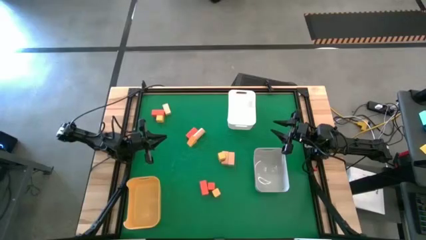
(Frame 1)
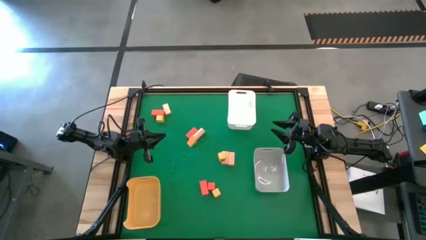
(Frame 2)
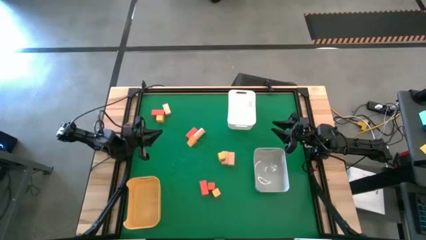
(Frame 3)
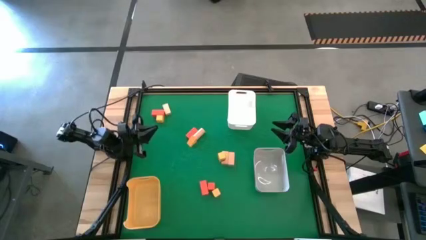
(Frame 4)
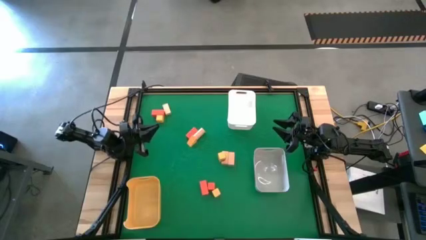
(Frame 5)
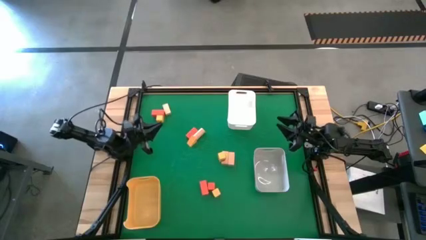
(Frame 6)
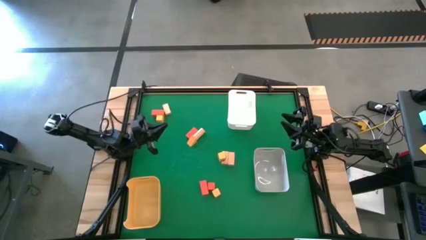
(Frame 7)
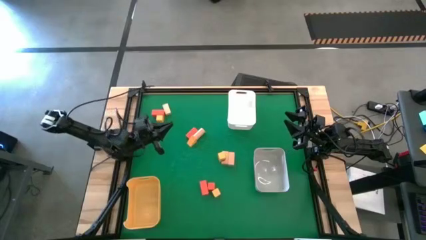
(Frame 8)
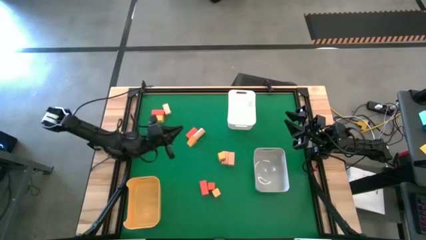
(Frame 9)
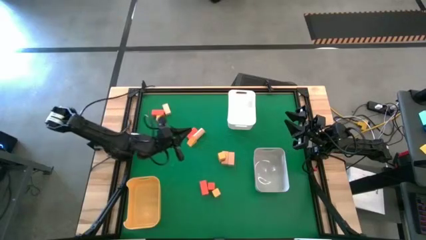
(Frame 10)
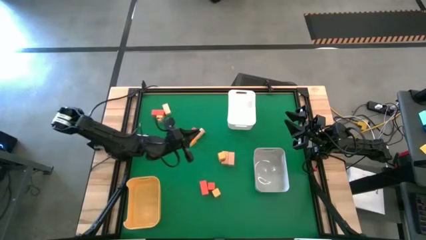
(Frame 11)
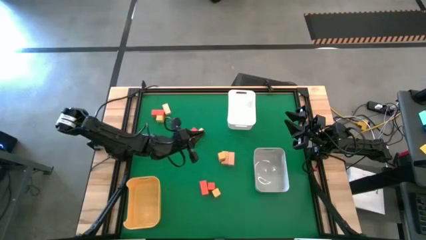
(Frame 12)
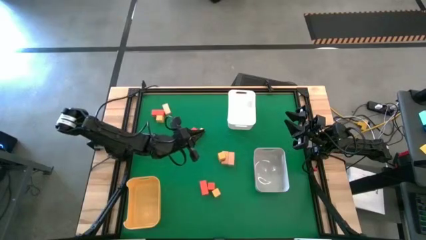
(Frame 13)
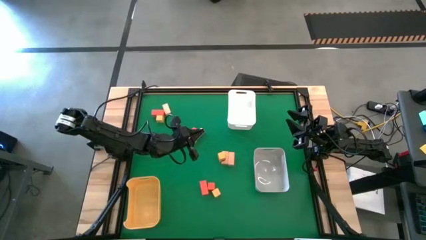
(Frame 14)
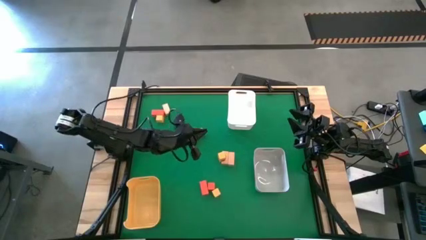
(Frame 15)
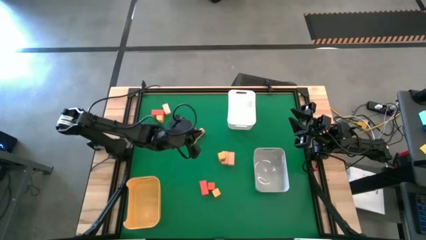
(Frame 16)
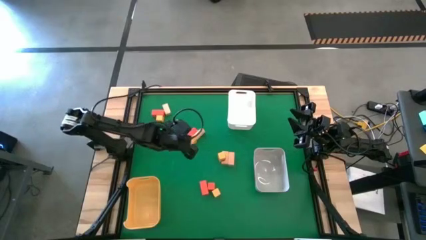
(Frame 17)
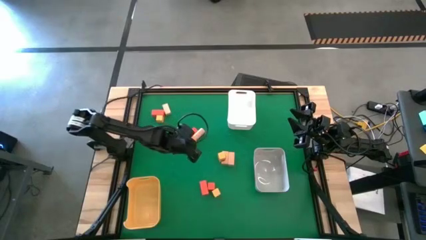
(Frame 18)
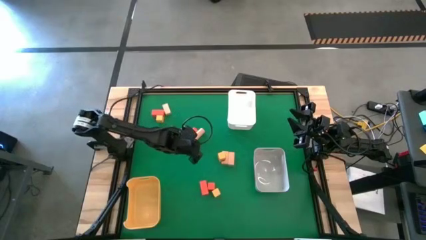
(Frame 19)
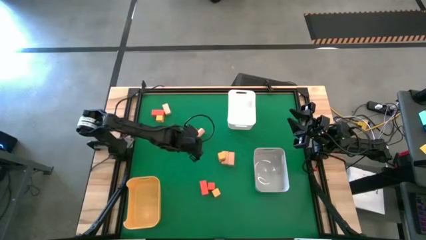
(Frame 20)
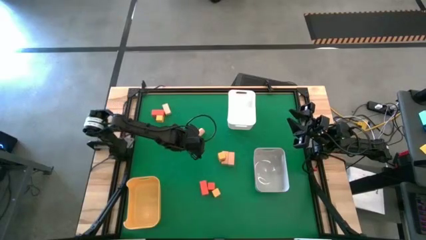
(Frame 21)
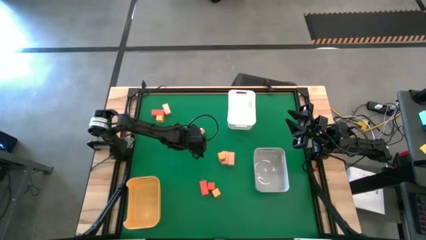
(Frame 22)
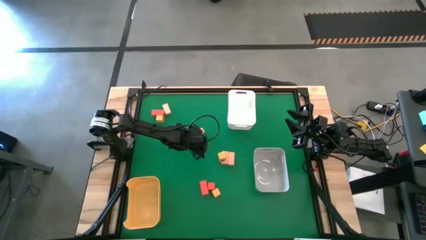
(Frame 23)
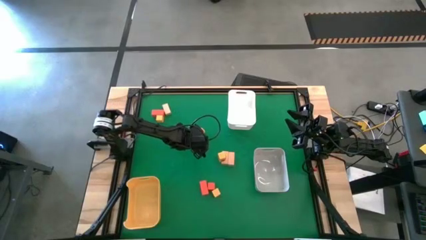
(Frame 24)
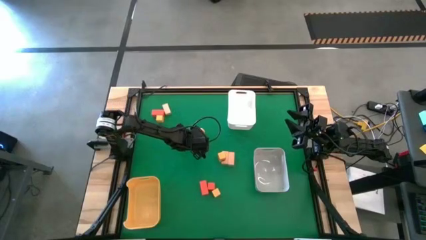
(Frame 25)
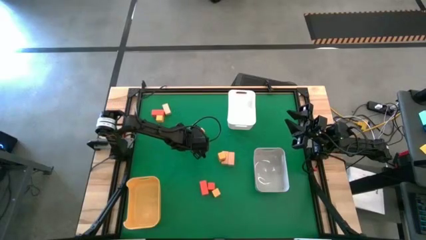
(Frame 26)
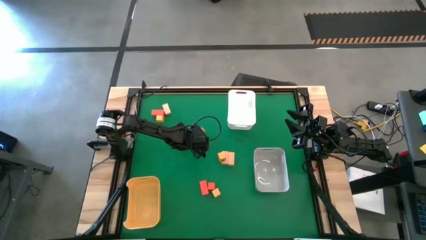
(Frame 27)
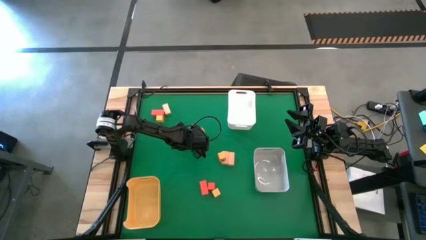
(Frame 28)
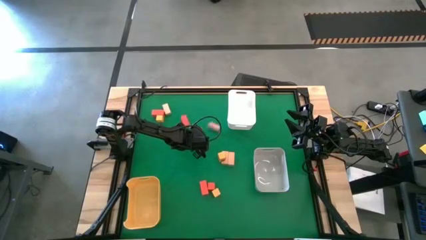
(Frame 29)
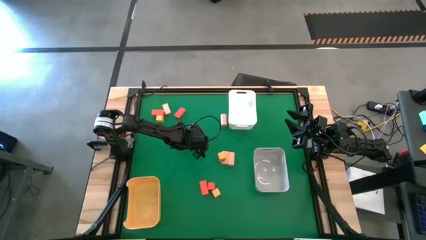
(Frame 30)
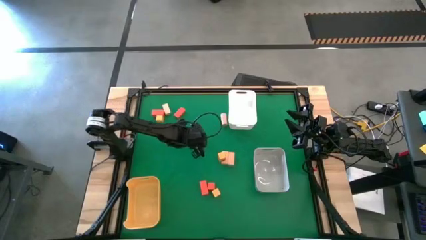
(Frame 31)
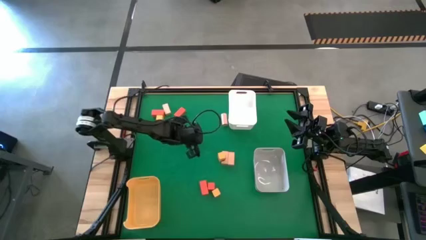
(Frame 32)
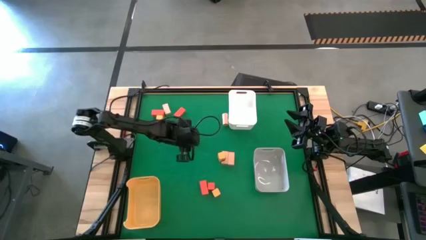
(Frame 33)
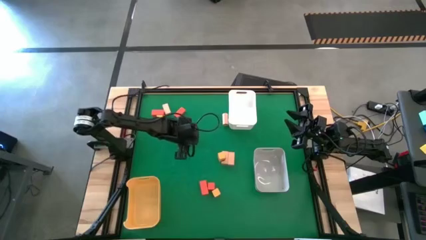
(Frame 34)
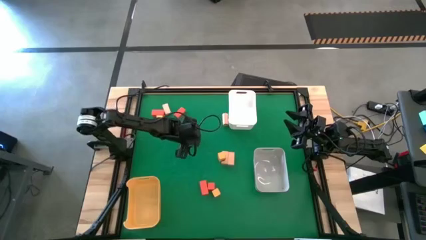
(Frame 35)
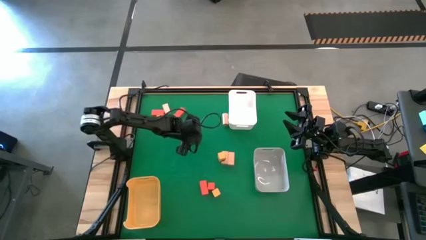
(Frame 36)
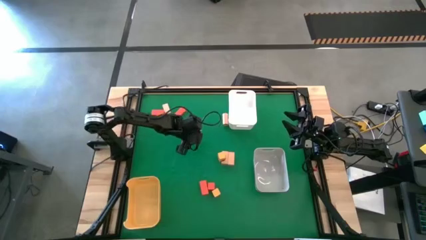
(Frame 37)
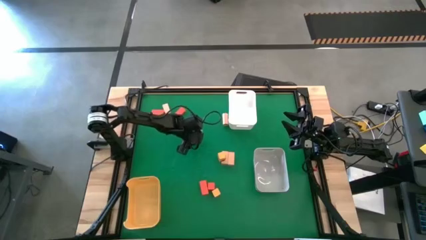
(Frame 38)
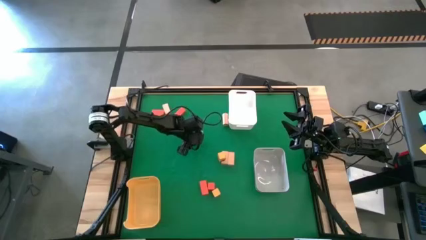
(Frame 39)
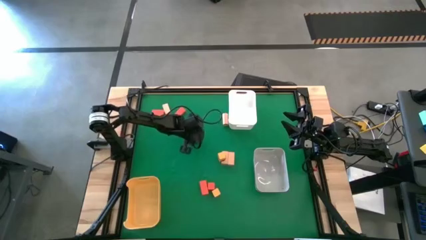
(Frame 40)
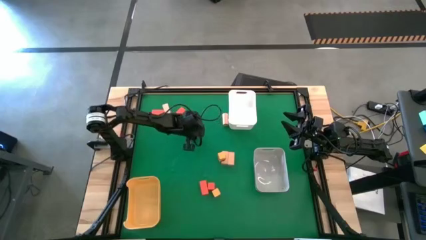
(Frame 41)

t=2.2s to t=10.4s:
Task: Sort & place blocks by color
Put the yellow block into the white bin

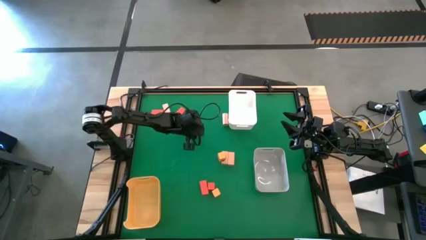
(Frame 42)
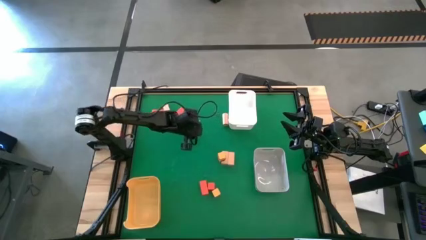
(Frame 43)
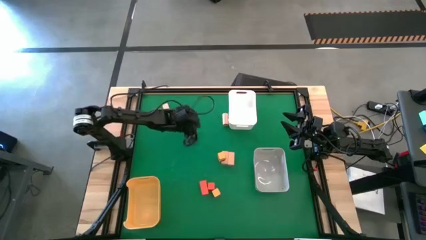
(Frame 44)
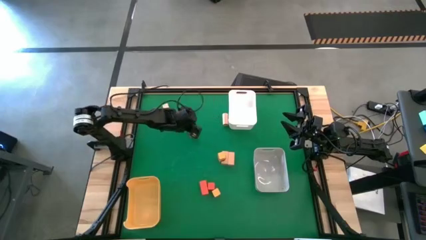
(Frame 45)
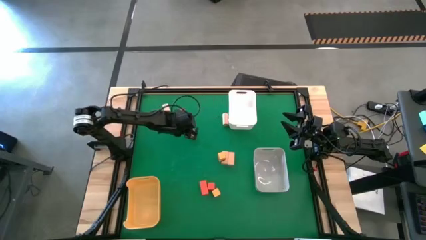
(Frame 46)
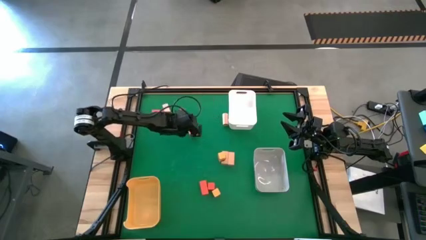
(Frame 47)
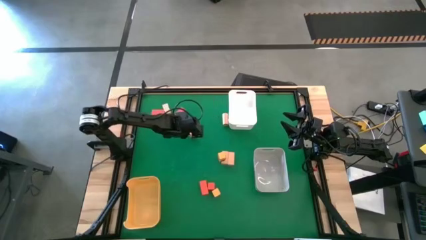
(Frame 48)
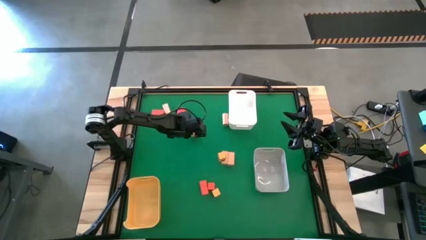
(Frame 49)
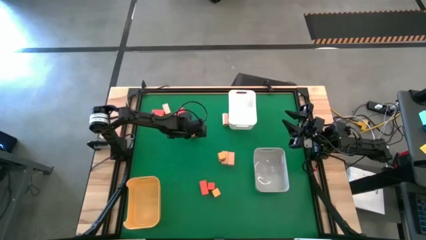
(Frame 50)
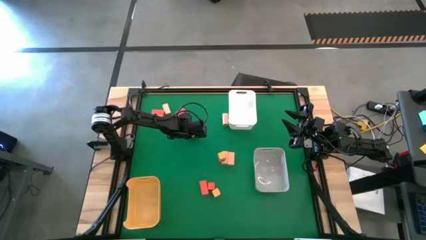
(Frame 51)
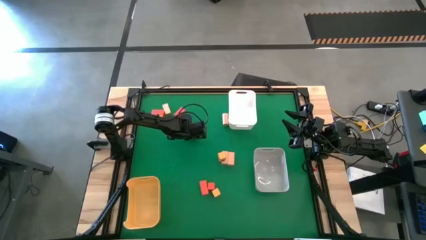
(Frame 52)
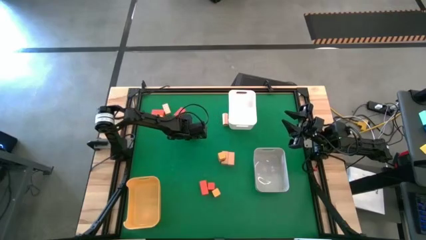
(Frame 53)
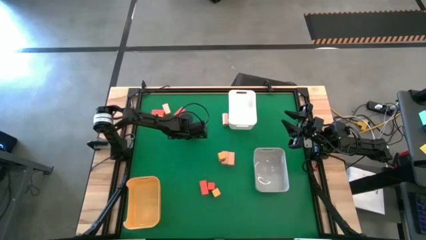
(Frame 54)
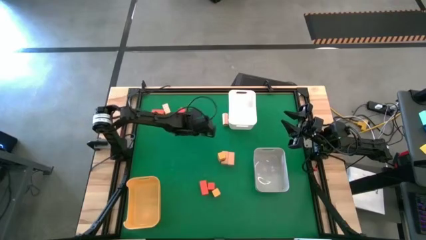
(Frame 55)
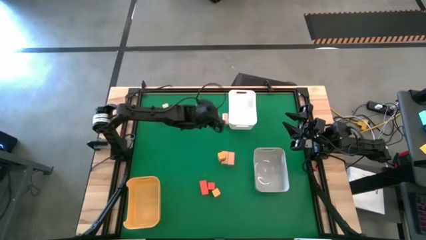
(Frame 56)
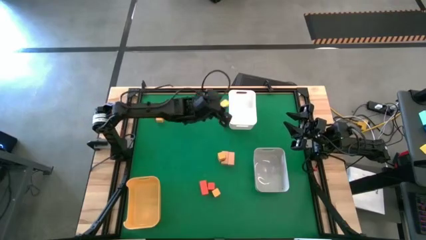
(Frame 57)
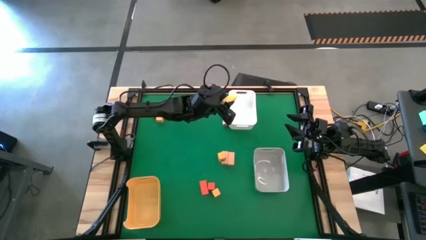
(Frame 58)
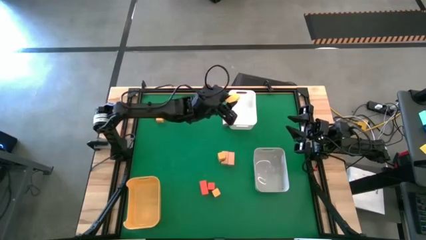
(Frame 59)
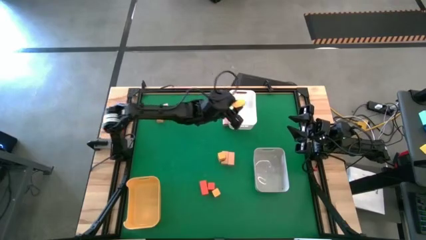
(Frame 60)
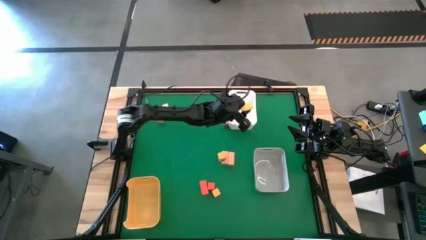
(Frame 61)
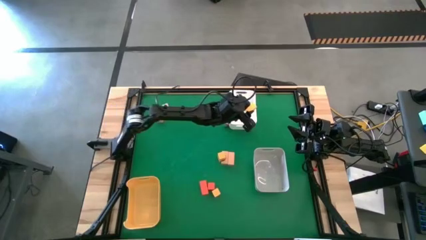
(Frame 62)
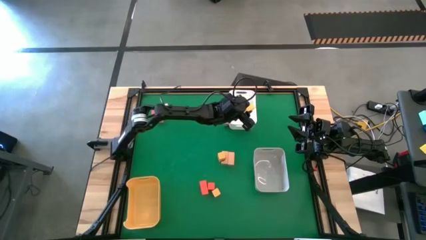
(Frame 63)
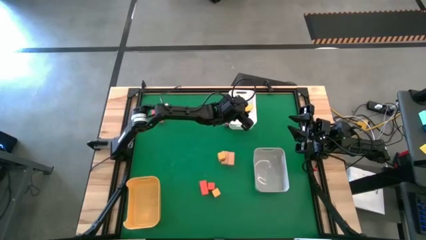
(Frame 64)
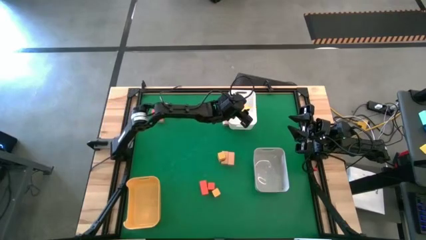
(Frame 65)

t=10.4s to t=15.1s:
Put the yellow block into the white bin

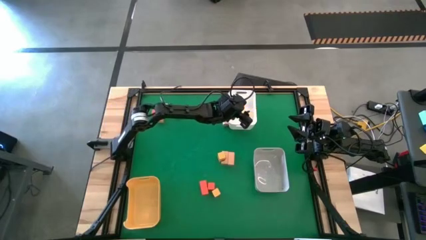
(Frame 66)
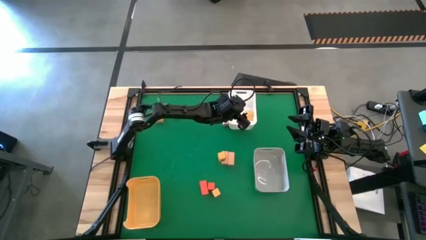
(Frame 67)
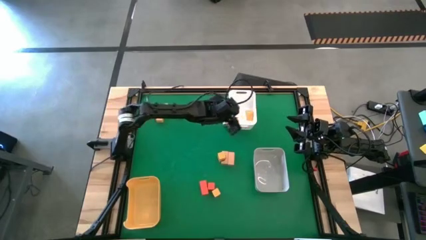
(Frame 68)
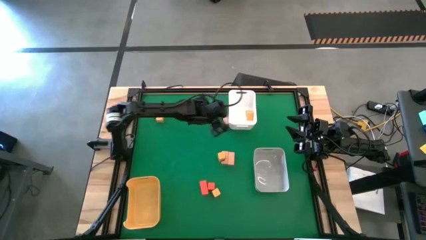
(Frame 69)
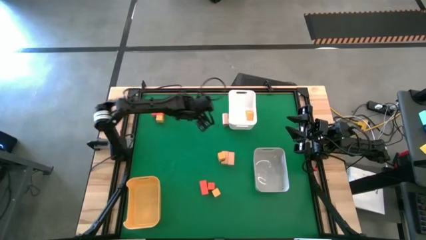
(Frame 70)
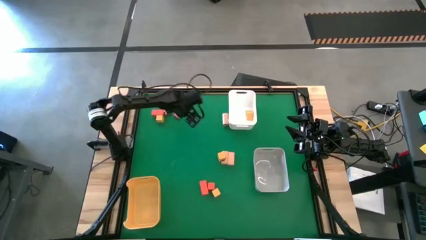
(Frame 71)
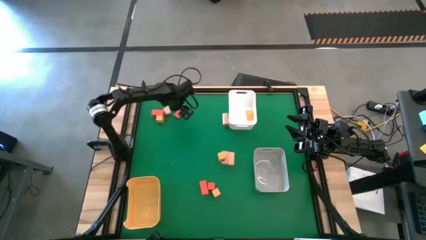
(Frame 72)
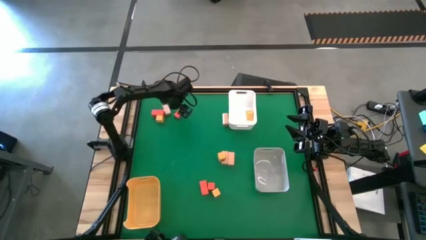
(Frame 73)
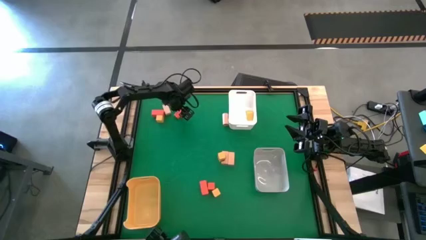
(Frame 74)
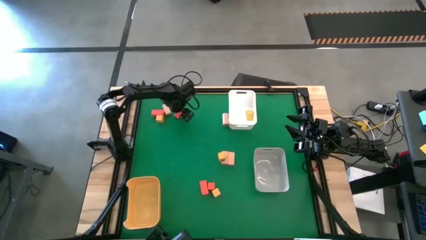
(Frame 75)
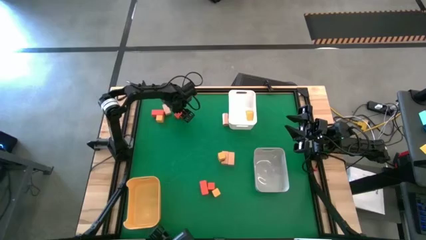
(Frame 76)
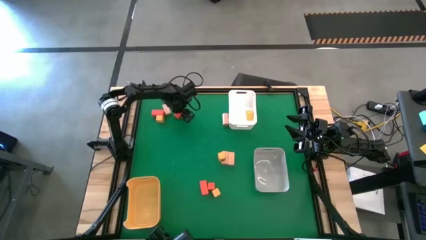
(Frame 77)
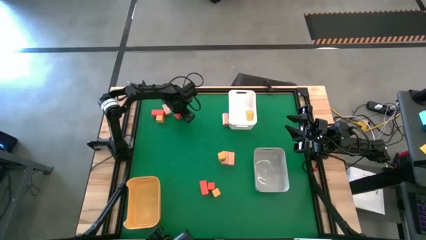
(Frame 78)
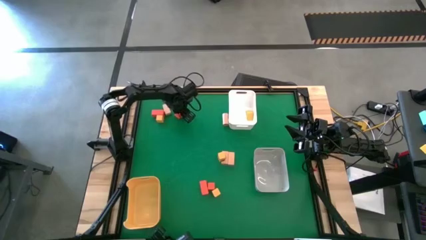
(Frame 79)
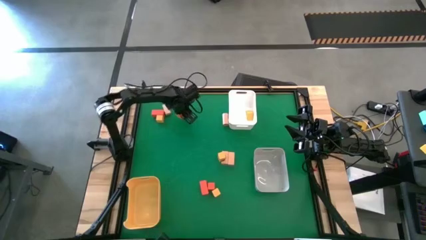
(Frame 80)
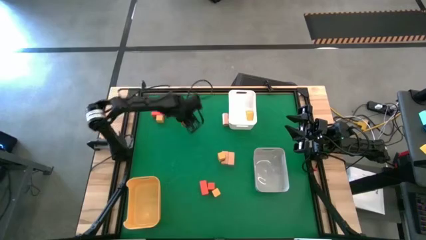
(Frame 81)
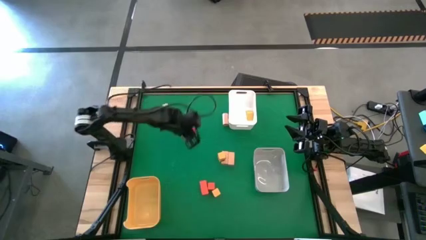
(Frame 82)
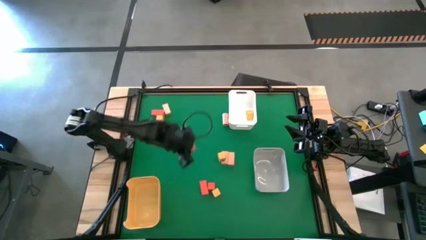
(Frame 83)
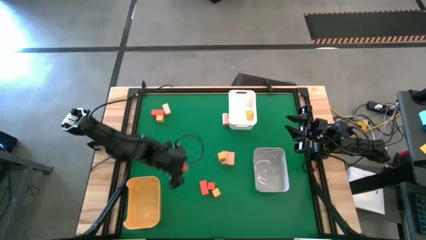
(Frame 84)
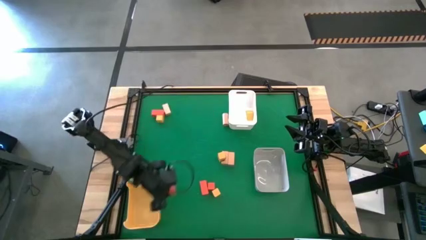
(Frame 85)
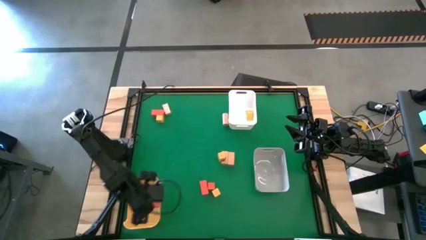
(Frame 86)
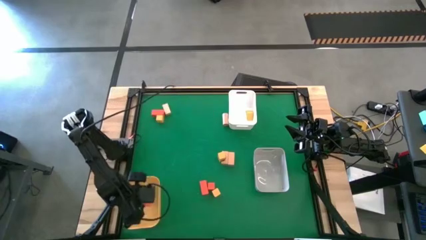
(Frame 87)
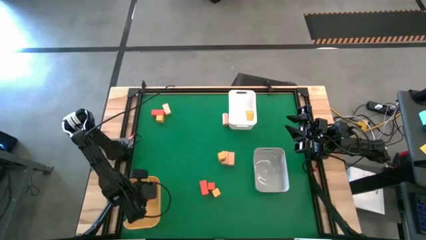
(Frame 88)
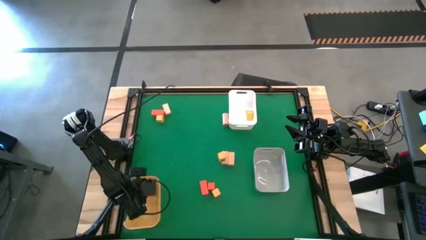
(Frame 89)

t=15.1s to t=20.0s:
Put the orange block into the yellow bin
